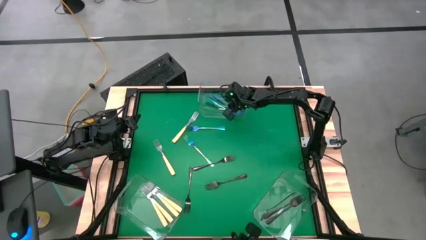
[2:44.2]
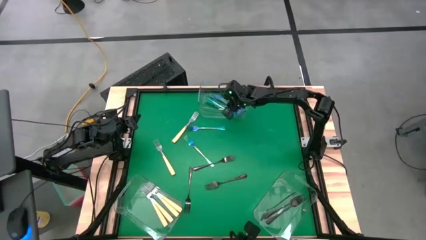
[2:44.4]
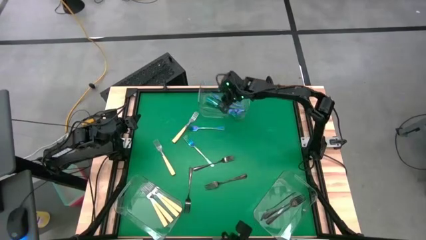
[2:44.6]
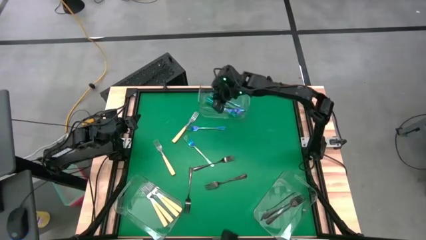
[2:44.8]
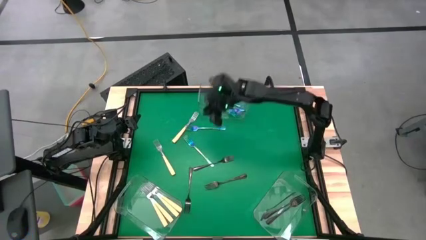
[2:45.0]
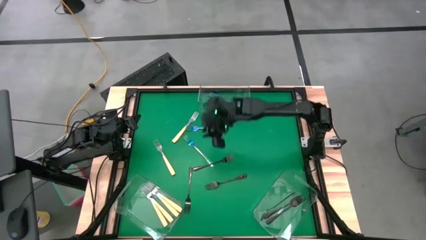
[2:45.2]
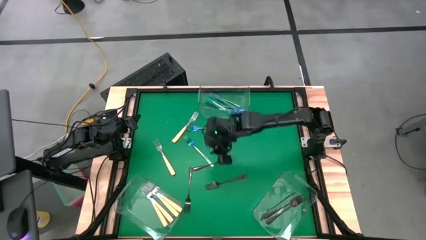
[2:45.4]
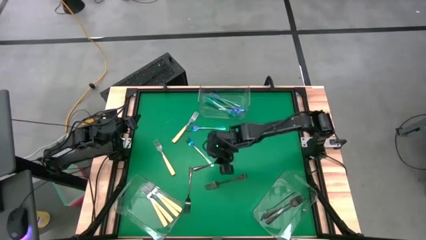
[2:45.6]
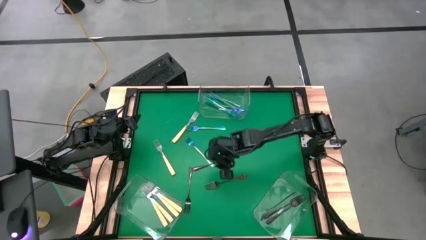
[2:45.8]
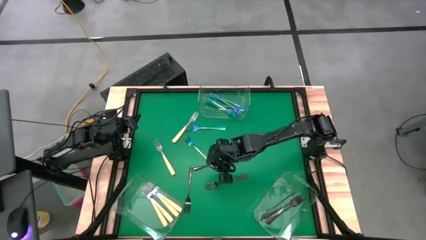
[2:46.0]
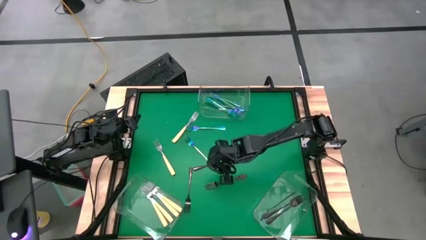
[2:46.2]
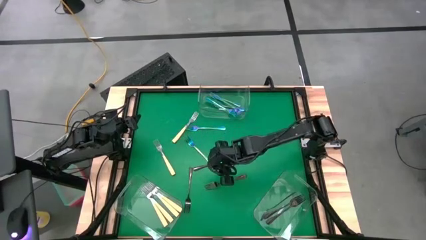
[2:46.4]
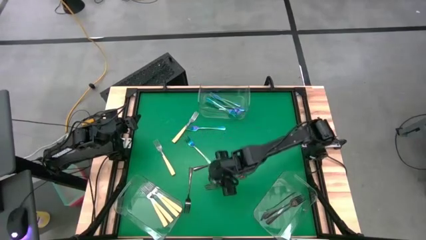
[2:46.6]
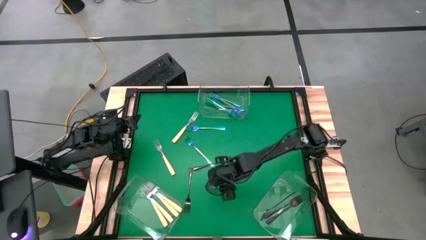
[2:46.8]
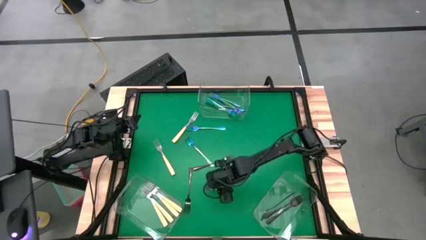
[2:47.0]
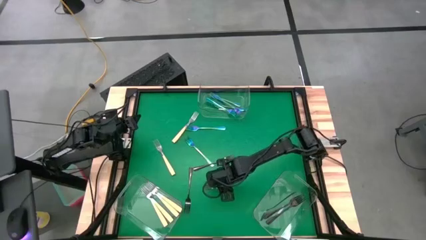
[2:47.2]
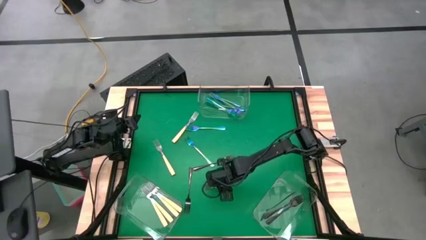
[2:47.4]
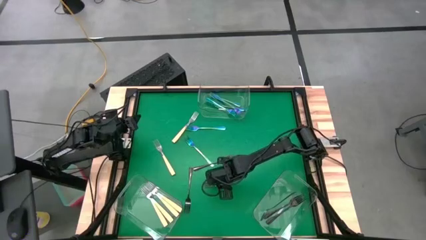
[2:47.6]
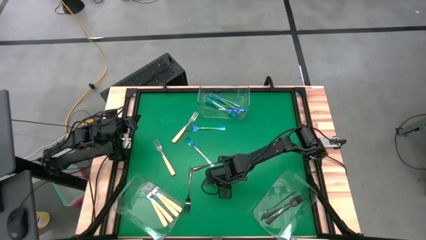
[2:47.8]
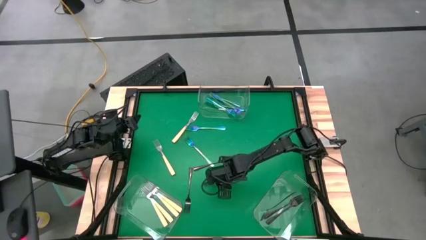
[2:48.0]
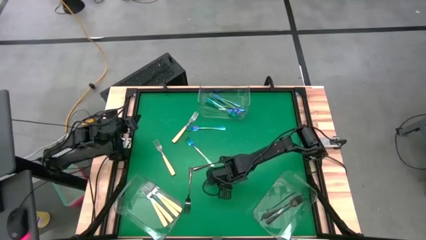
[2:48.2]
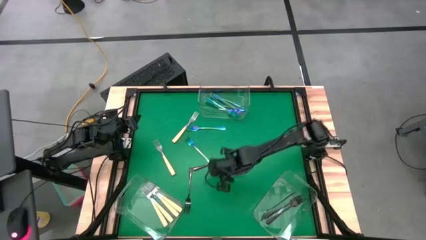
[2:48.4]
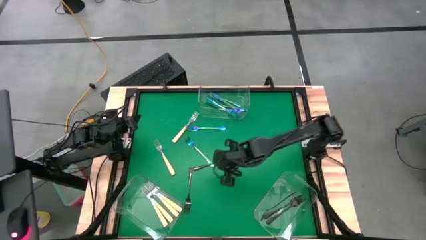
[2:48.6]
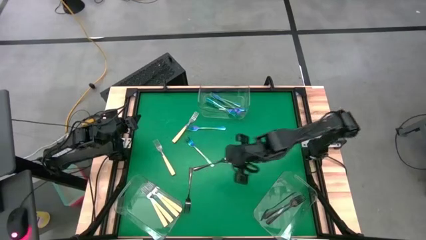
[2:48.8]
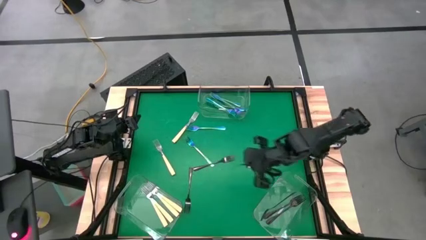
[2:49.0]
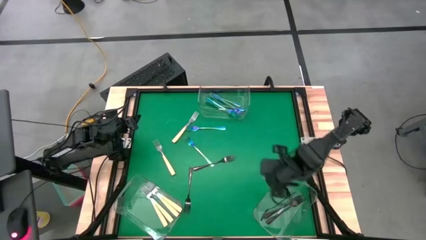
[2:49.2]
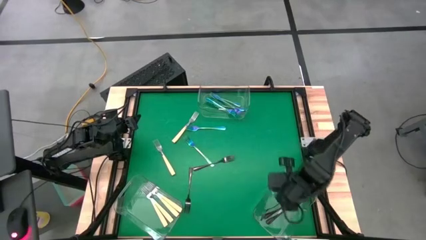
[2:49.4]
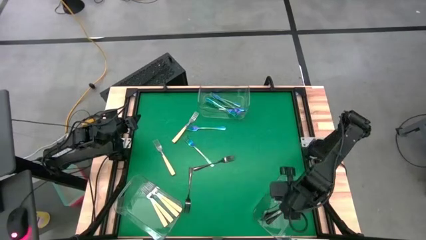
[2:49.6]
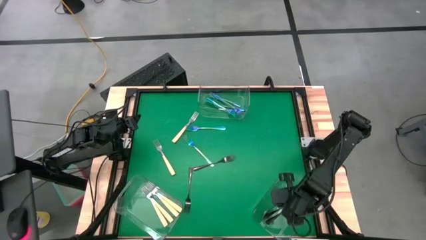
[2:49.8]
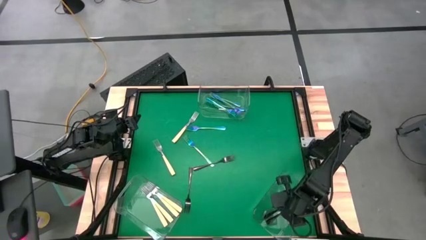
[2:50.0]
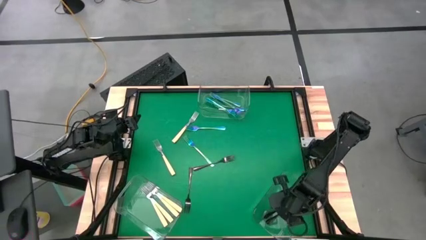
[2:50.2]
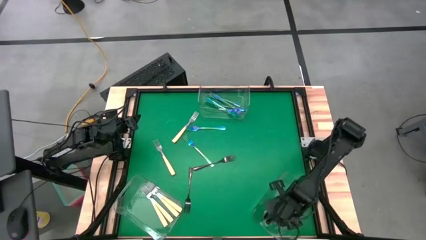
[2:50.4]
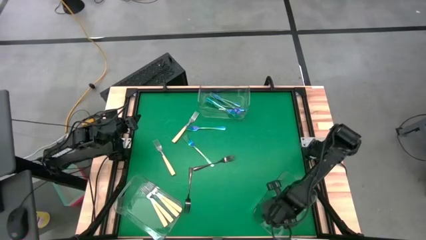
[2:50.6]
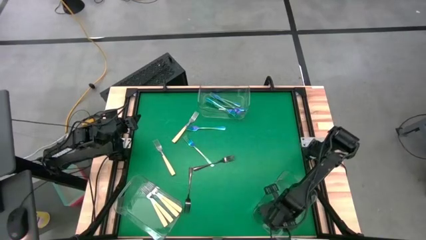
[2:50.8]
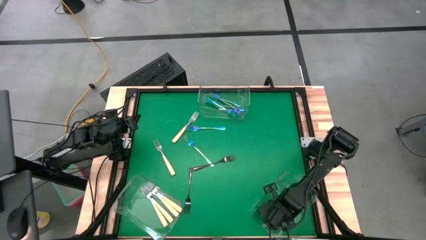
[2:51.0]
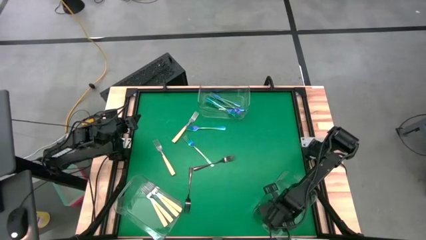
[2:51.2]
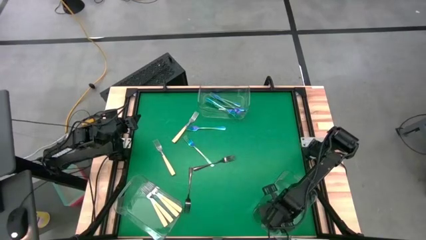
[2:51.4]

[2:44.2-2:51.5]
Task: Sort silverware by color (type)
Put the black fork into the bottom right transparent bin

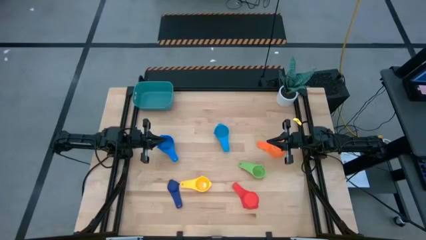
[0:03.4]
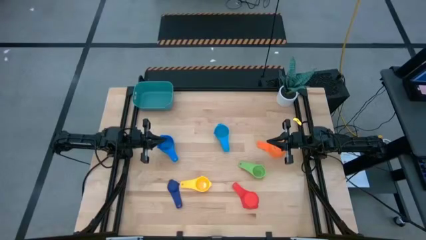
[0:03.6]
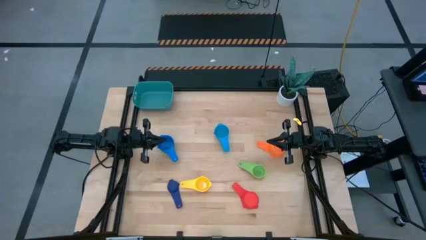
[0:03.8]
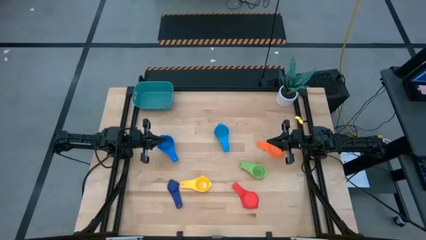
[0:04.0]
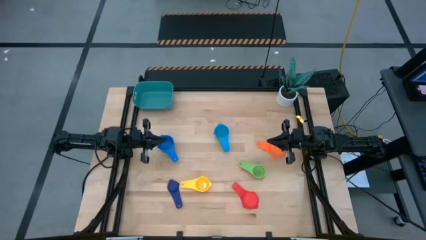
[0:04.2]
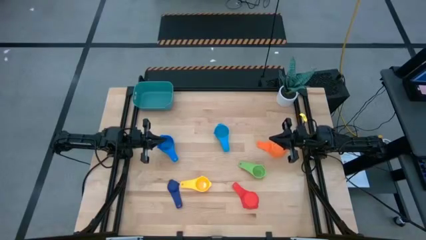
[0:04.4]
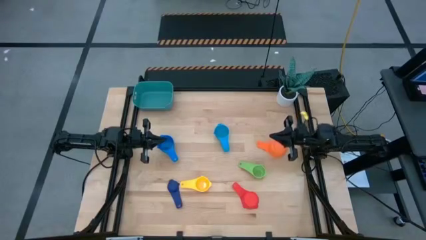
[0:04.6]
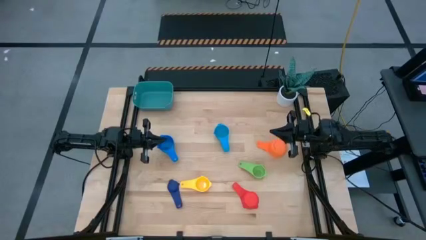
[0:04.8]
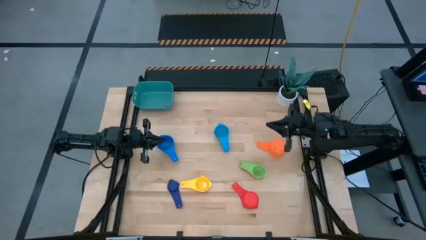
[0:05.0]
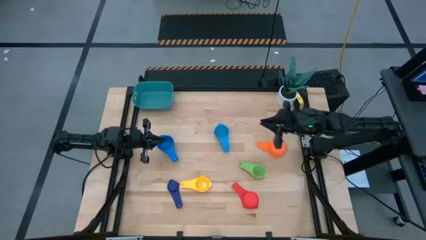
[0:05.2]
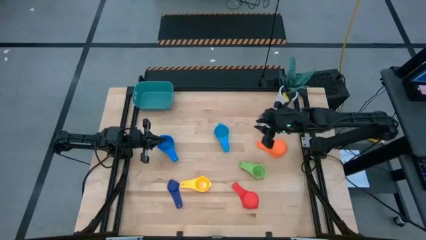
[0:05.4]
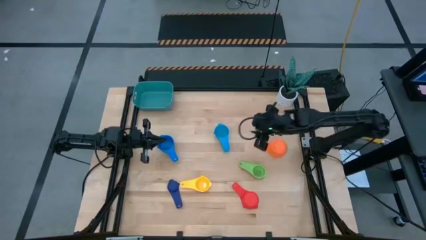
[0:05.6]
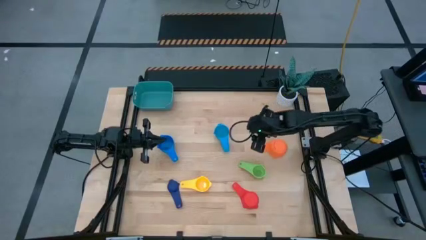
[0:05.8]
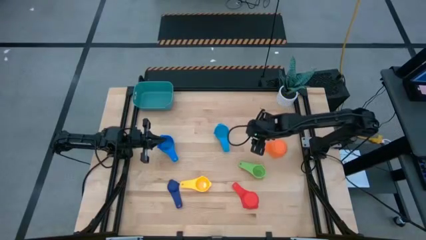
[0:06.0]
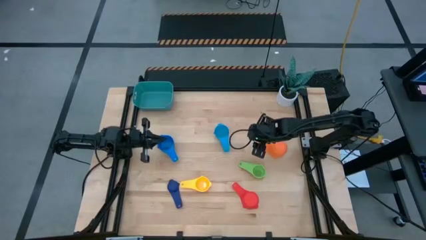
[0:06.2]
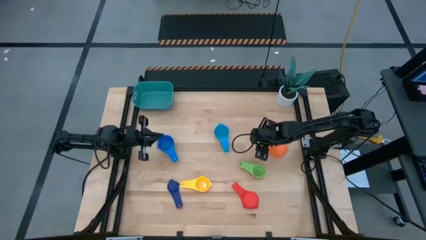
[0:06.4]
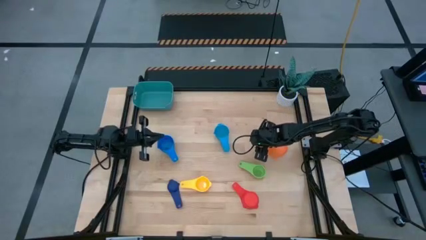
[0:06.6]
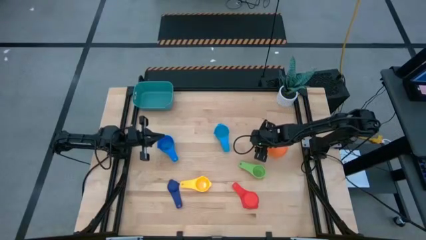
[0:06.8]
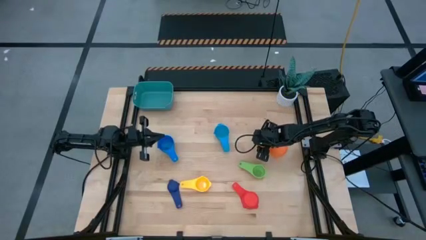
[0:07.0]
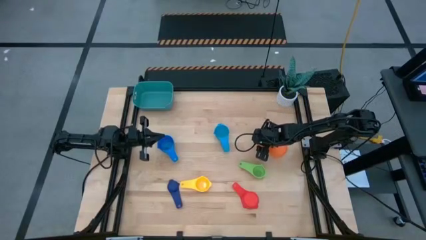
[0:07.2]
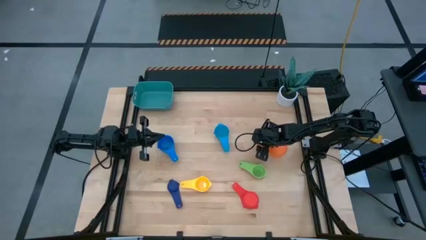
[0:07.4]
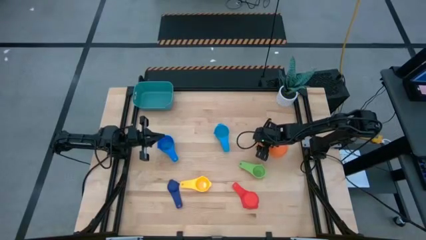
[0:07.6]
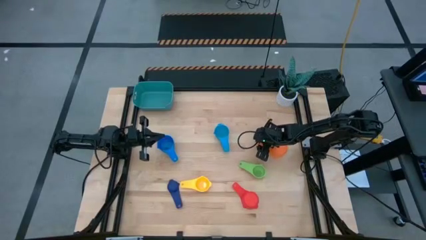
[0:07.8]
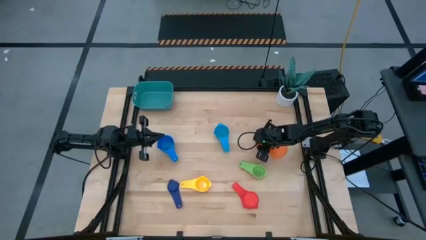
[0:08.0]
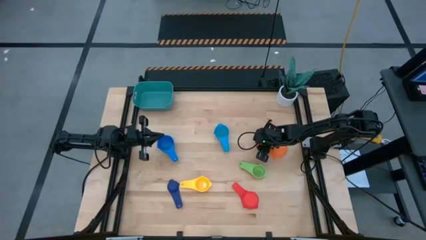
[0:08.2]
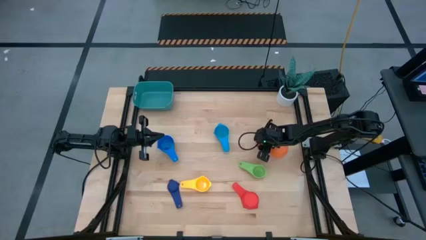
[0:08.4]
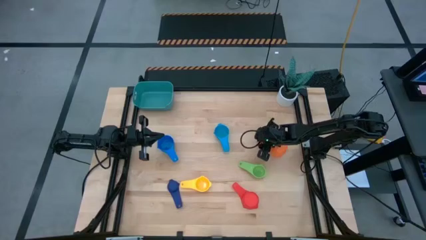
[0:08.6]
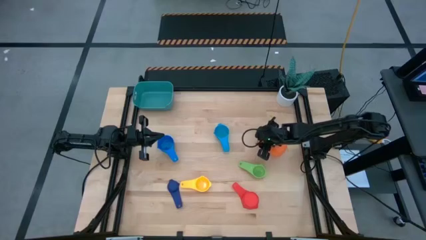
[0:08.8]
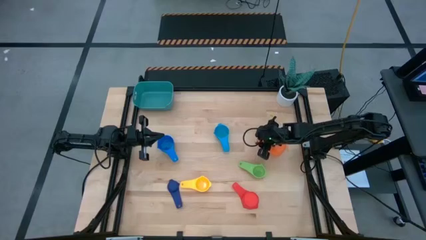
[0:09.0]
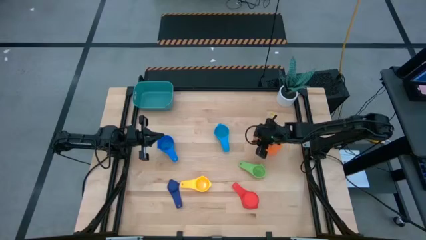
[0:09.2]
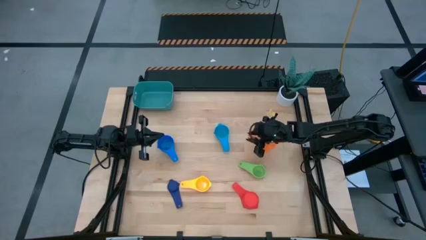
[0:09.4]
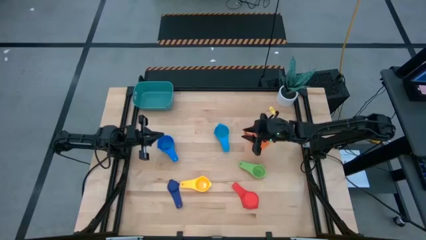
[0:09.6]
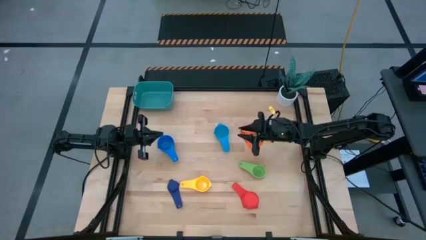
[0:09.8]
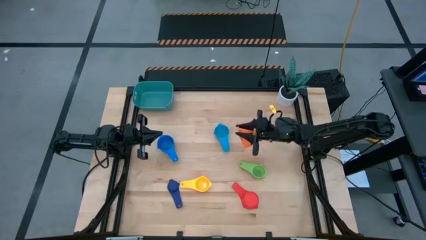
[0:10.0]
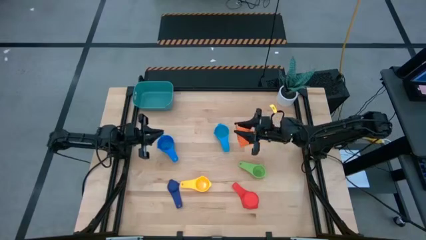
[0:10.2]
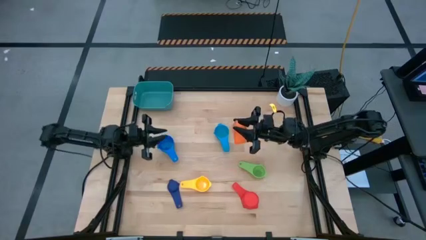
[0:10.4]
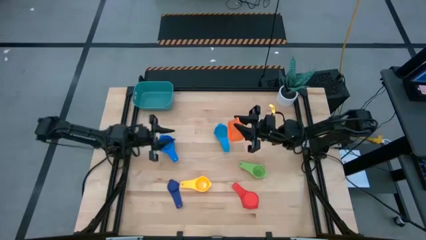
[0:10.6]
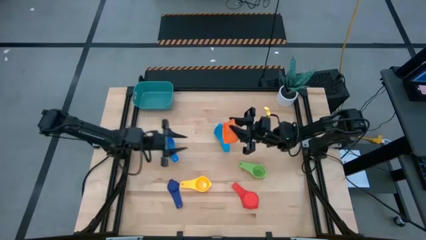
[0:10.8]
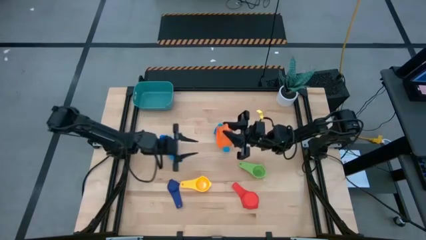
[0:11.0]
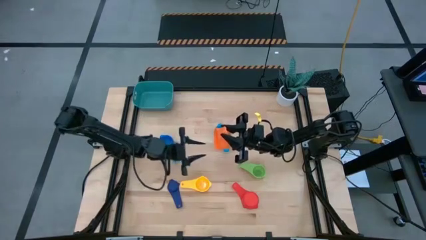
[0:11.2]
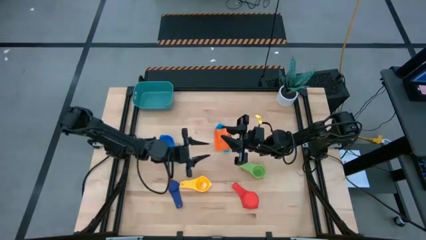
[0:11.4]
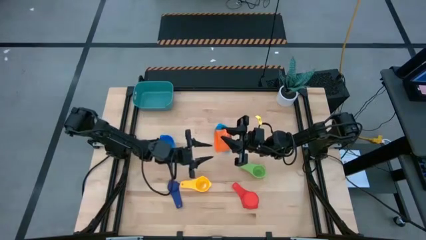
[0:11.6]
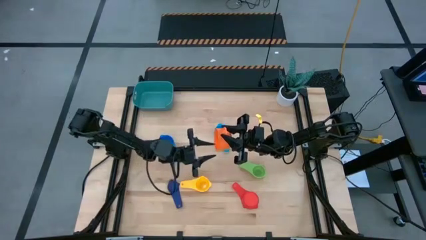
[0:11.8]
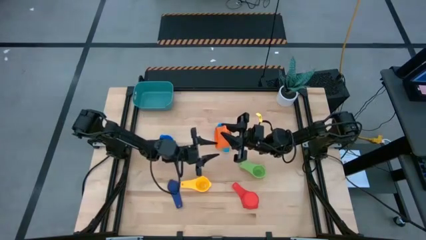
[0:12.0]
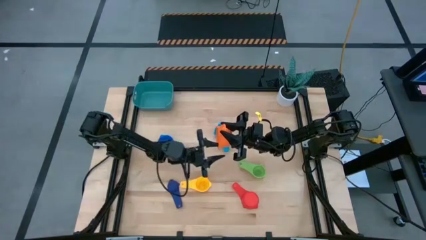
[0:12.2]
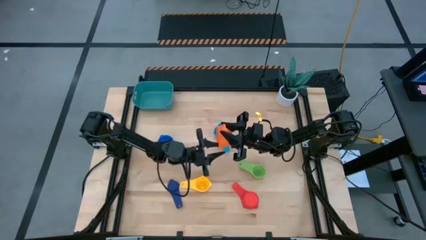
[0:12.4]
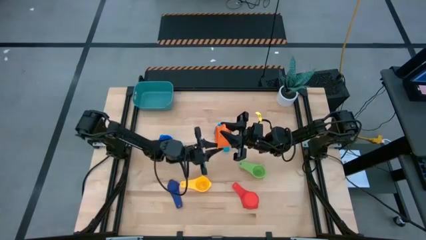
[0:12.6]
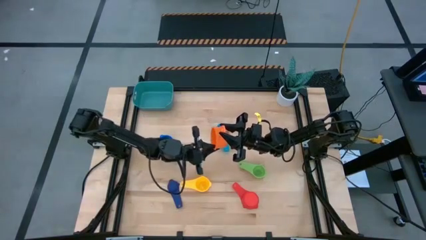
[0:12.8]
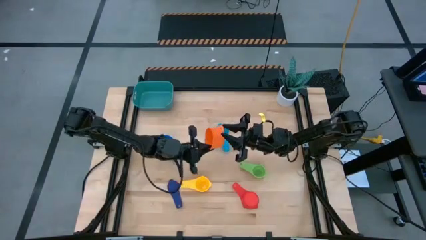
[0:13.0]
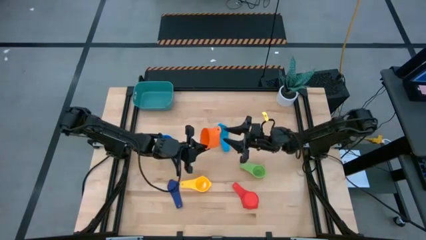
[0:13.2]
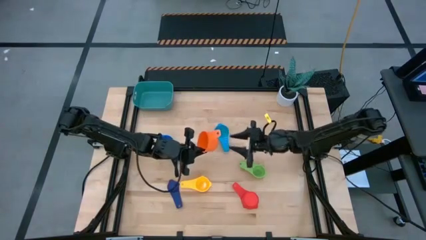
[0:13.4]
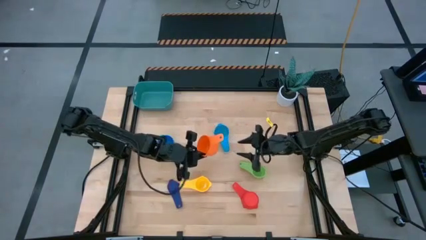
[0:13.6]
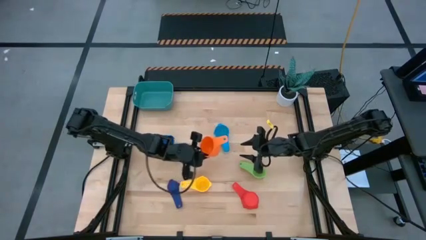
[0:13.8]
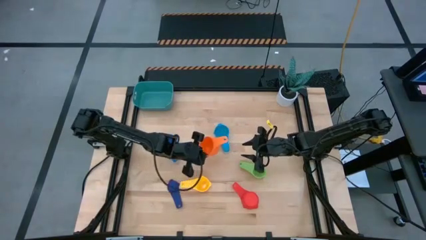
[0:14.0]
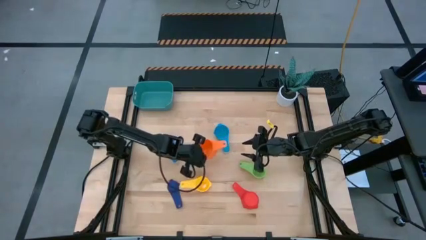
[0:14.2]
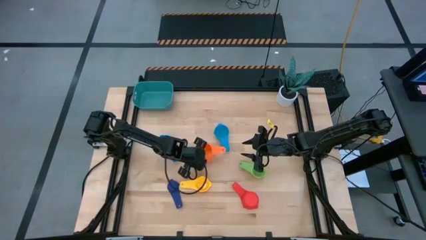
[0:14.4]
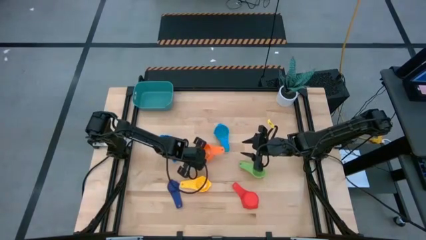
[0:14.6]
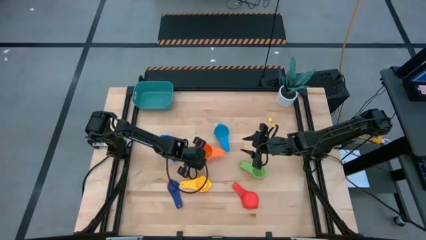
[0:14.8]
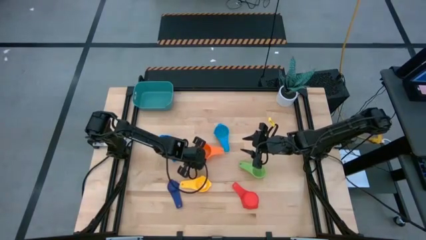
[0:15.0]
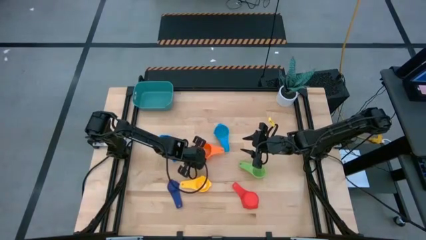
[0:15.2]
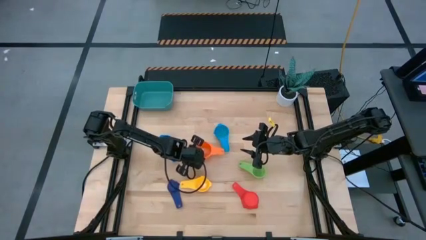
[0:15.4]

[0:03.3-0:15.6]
Task: Nest measuring cups in basket
Move the orange measuring cup to the center of the table
